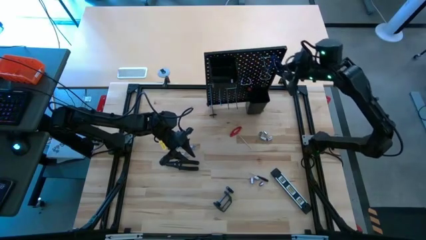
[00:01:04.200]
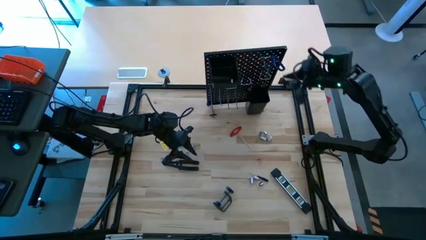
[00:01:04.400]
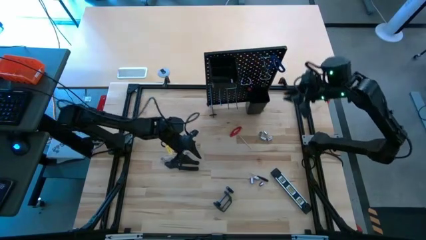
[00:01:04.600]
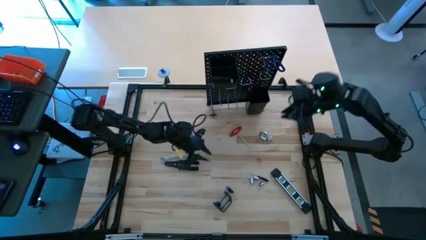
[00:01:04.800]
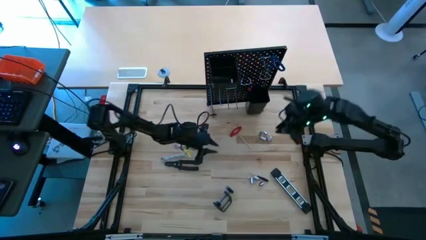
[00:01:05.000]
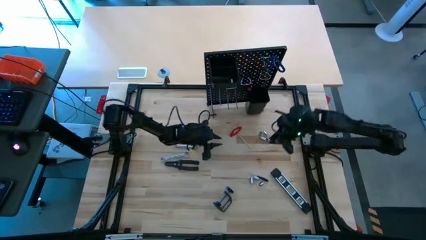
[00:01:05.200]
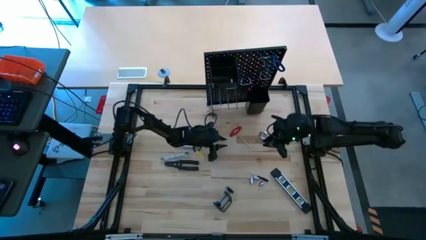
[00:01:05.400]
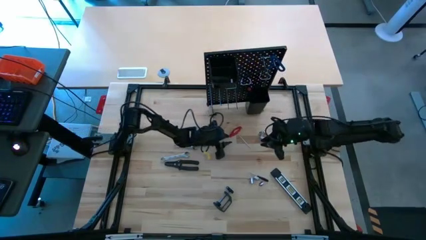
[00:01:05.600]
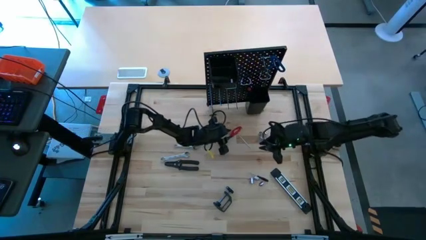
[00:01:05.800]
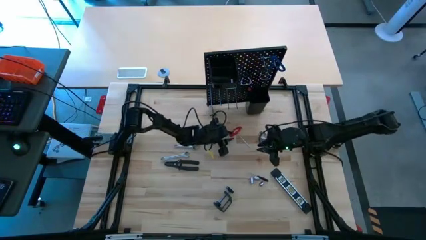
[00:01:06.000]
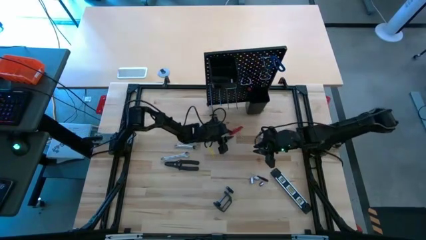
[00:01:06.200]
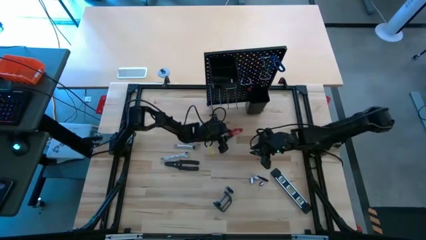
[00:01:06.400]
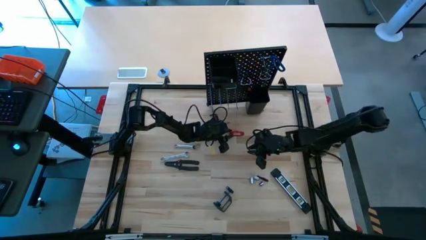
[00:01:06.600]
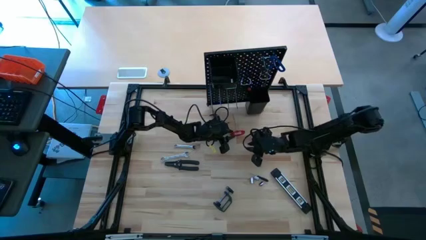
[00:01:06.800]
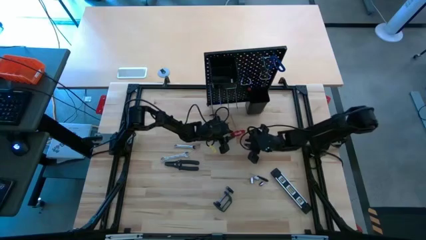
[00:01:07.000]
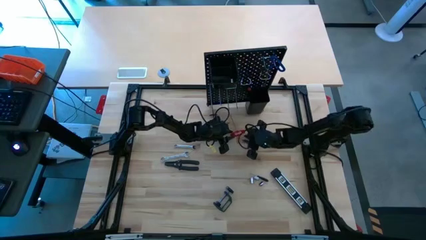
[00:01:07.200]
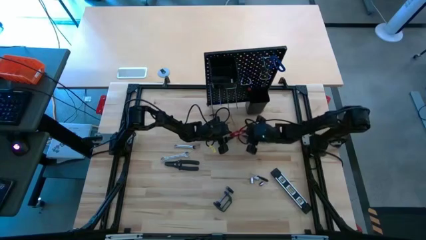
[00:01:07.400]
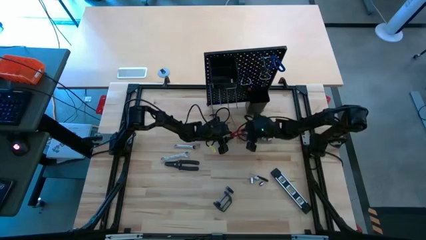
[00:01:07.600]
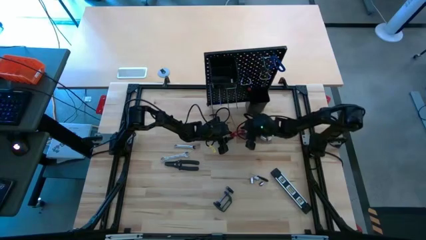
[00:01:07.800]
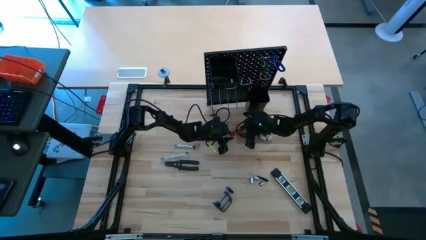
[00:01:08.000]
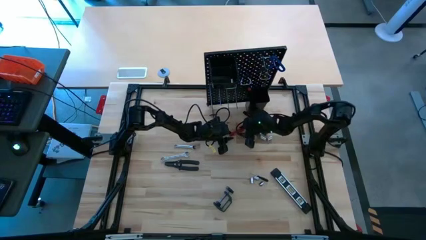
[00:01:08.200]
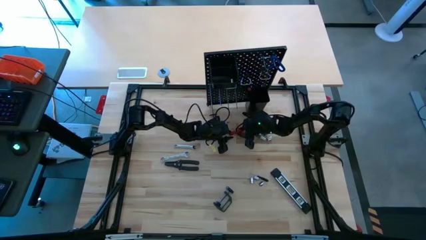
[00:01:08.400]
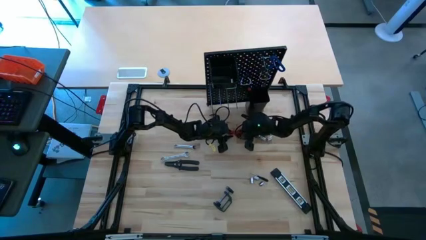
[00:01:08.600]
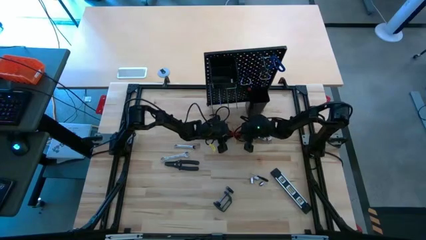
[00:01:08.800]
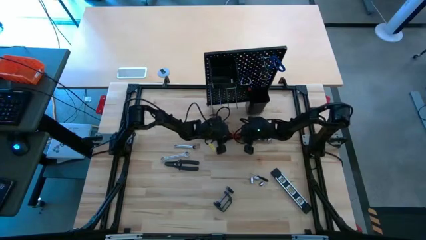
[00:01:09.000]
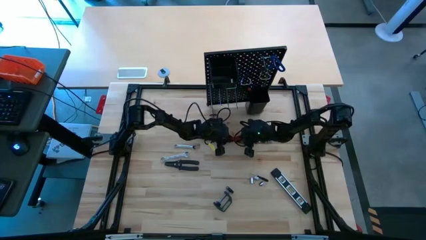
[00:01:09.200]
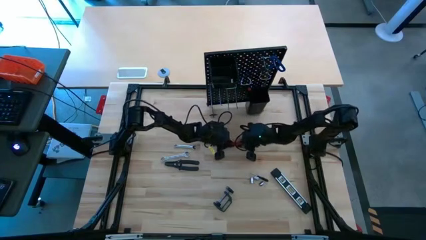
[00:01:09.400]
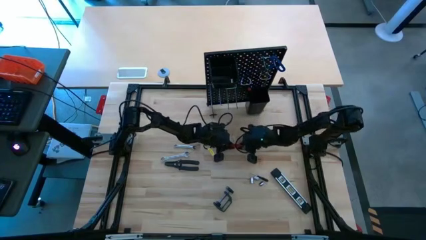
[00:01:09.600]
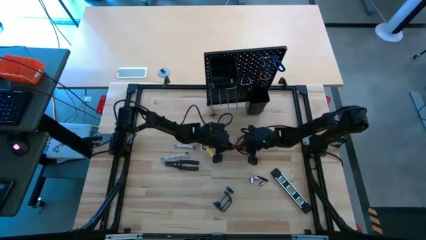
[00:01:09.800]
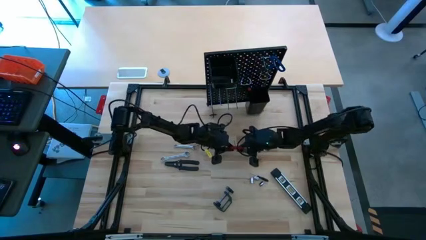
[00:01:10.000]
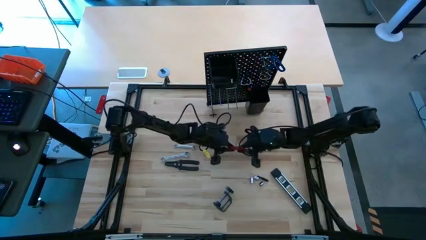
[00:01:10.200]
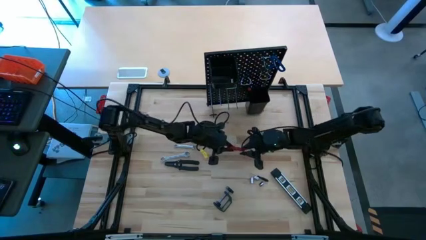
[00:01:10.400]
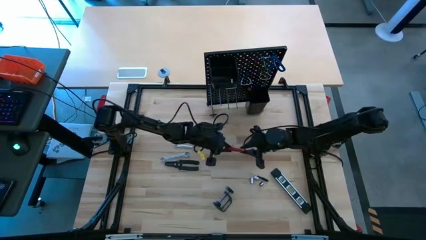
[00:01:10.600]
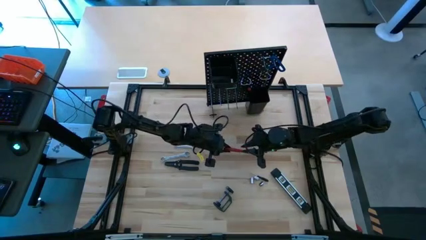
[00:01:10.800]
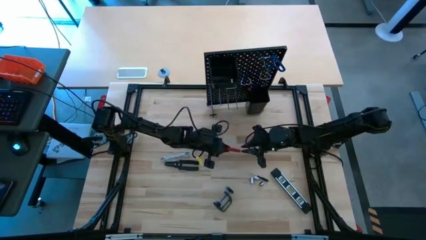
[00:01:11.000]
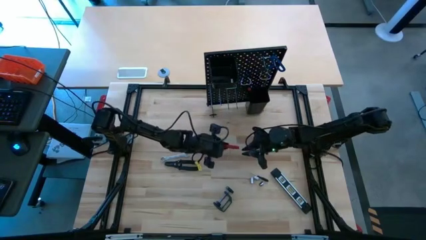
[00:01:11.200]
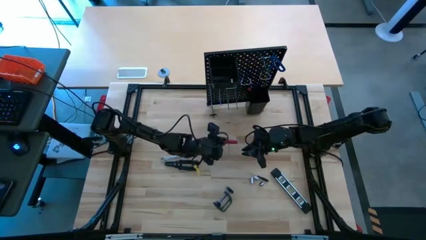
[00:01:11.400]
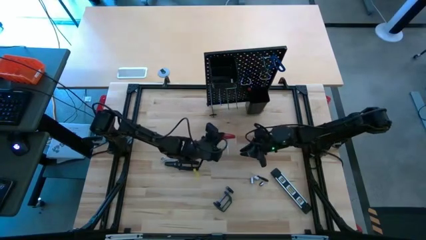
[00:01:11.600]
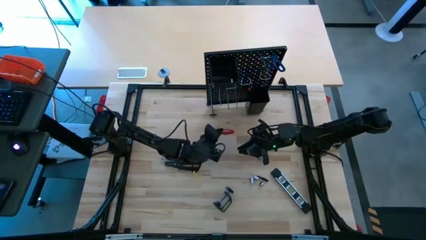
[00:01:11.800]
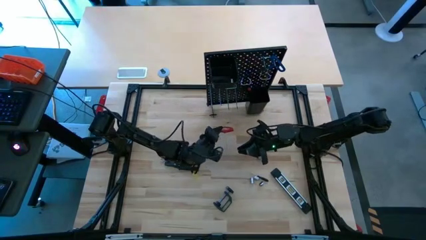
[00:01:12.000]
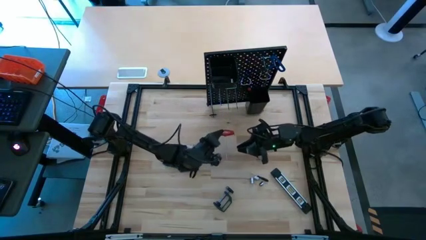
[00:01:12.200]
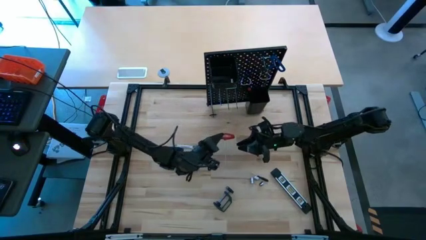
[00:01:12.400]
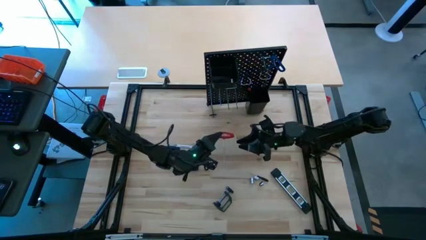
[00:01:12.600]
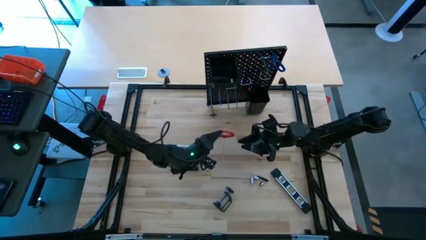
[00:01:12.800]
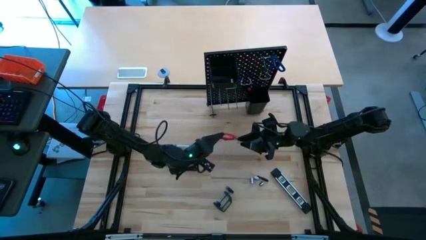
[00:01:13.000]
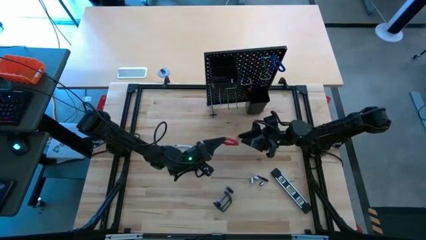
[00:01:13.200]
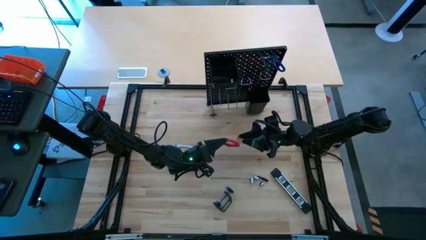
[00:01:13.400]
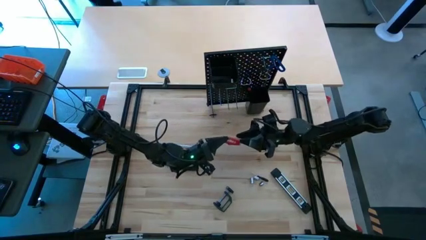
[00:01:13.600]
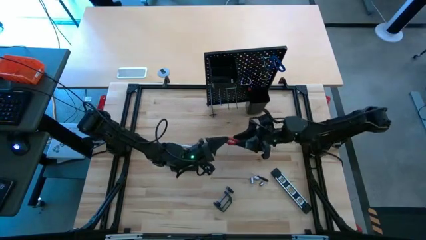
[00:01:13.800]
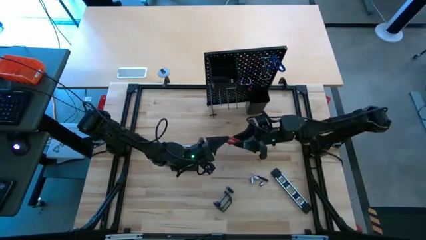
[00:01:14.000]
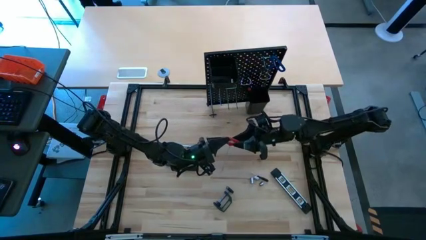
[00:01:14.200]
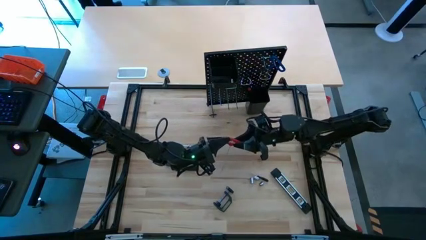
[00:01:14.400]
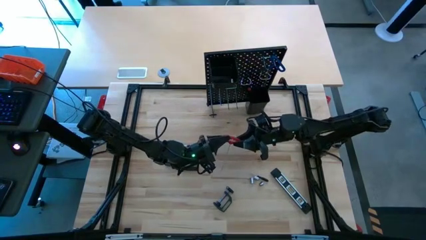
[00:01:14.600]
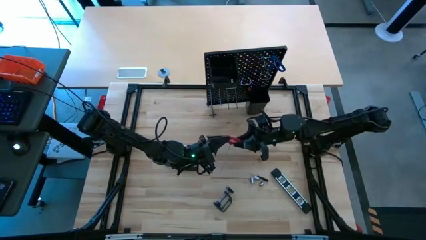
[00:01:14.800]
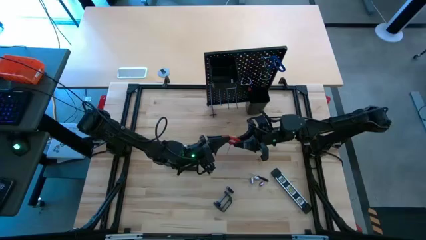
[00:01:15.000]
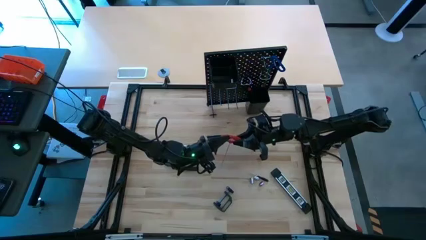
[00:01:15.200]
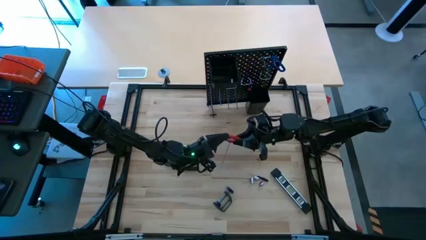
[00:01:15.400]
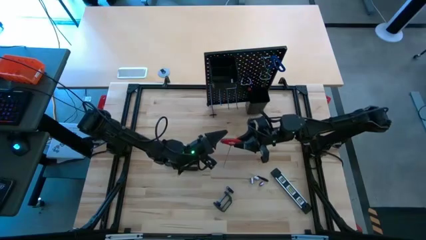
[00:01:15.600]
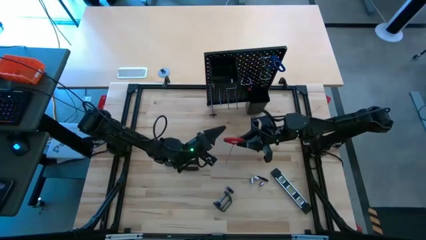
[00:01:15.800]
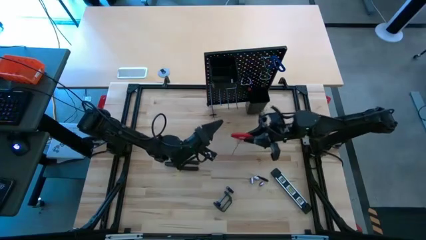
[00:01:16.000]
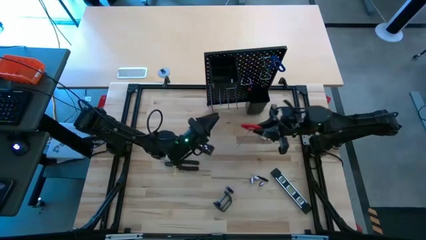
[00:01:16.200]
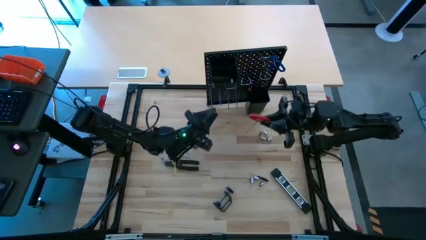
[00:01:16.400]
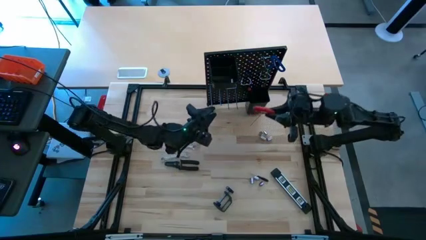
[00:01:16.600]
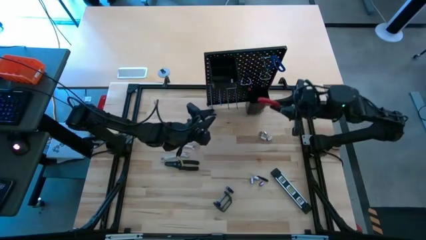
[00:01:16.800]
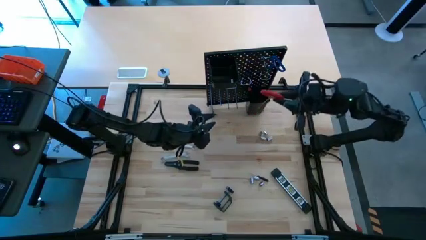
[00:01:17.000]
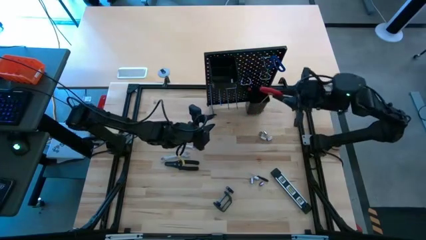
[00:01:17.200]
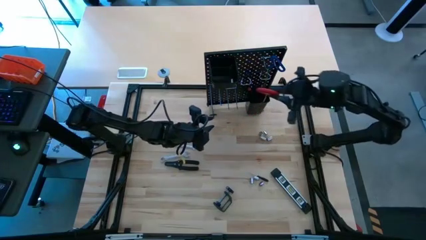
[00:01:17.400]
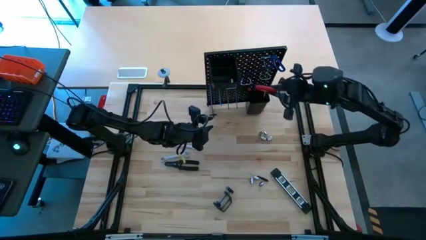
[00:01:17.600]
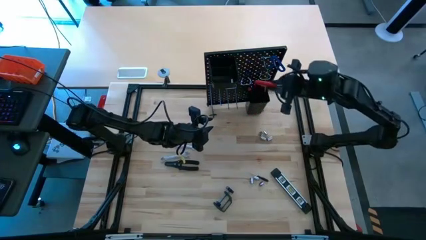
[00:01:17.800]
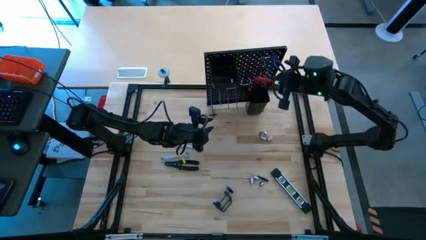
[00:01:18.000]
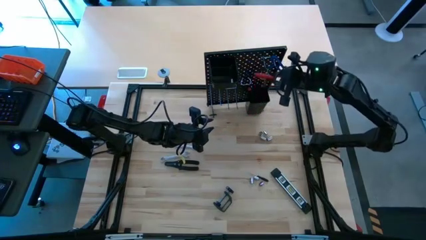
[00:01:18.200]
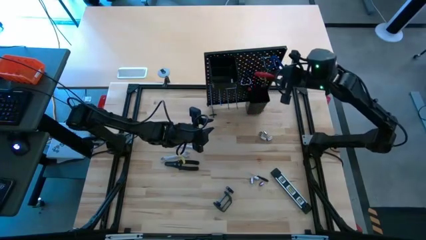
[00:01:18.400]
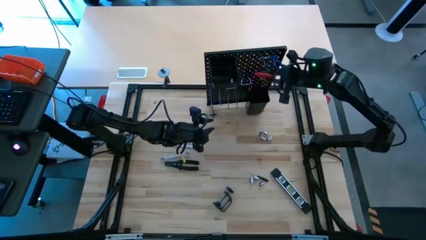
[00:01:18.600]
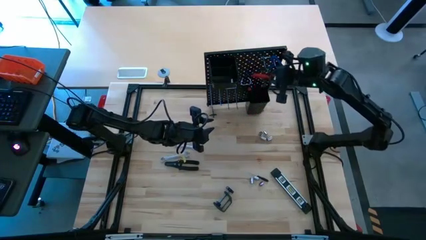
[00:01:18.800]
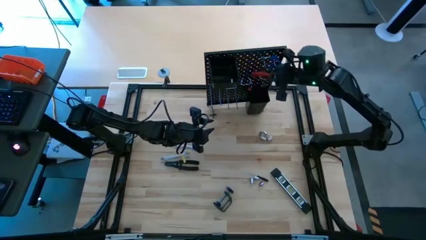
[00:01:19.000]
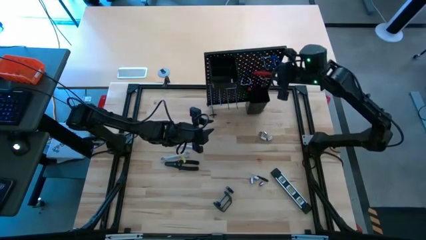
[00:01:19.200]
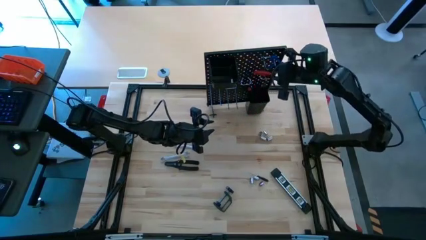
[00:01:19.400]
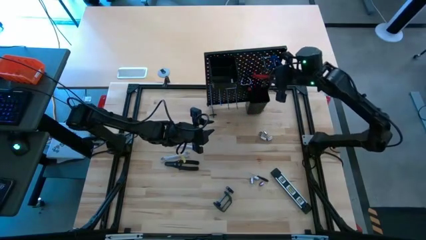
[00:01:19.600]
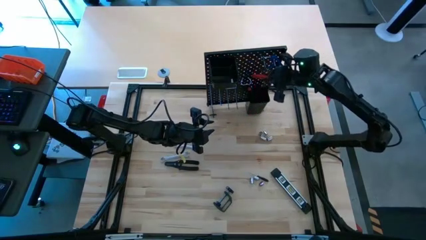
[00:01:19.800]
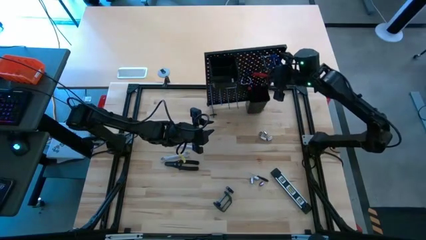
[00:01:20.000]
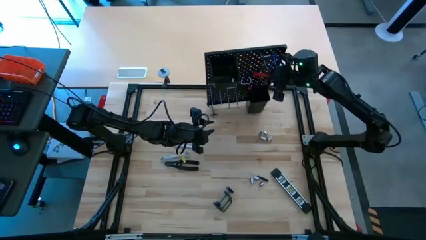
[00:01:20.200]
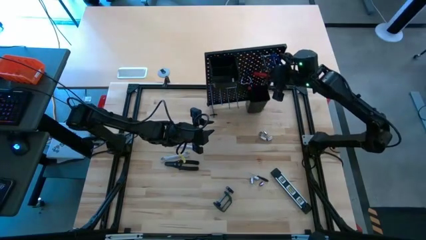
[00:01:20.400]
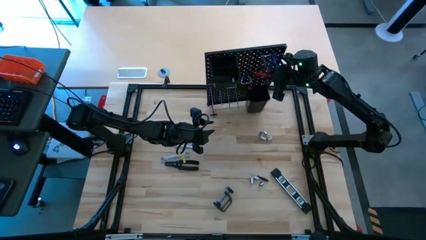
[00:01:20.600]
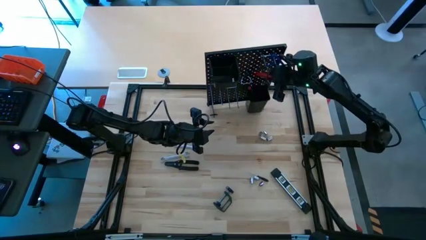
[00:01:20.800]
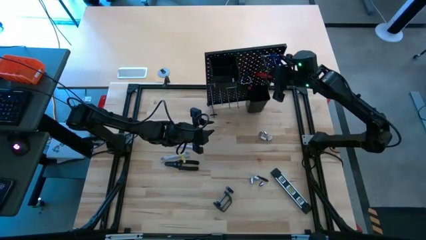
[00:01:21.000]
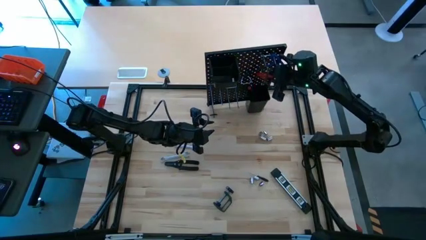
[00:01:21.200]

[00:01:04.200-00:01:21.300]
Task: Hang tools onto peg board
Put the red allen wrench into the bottom black bin on the peg board
